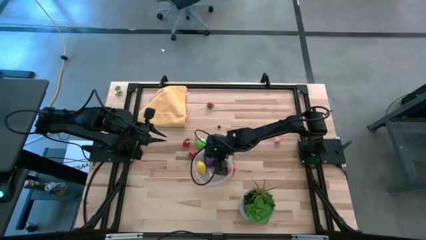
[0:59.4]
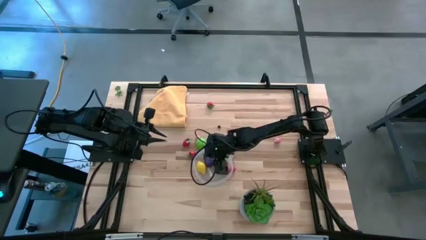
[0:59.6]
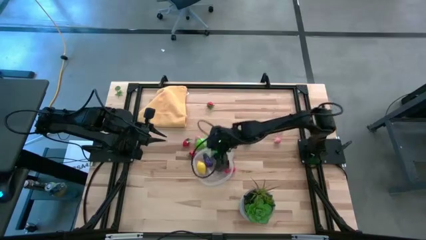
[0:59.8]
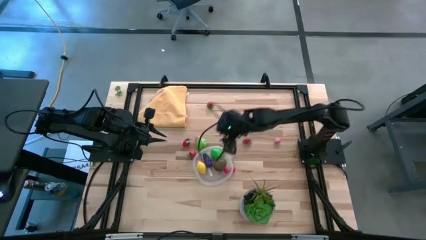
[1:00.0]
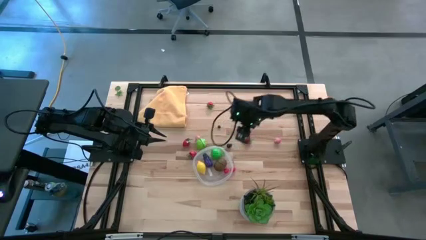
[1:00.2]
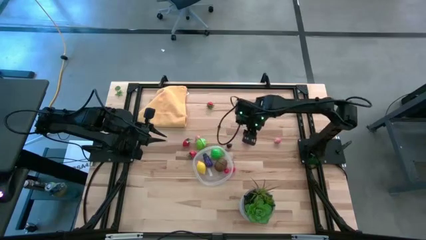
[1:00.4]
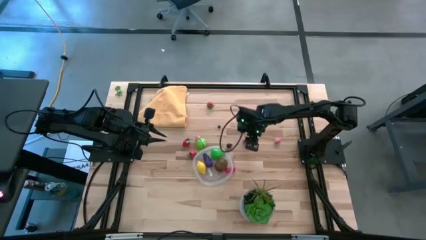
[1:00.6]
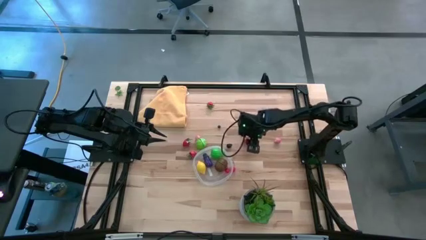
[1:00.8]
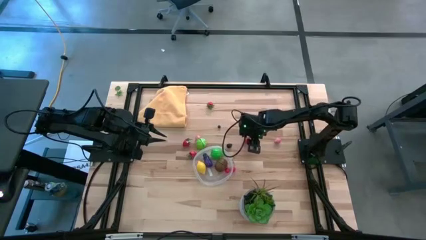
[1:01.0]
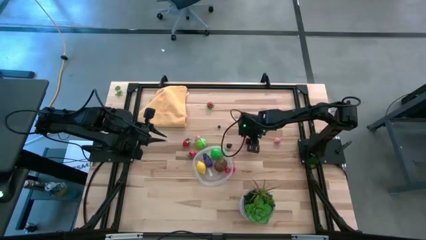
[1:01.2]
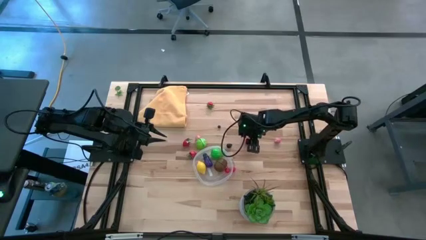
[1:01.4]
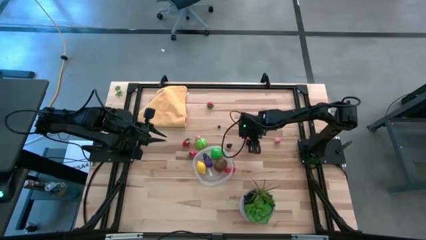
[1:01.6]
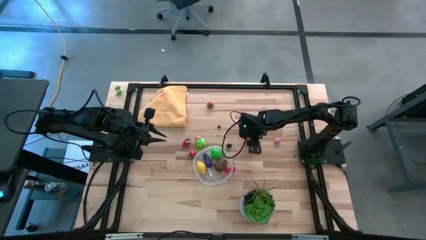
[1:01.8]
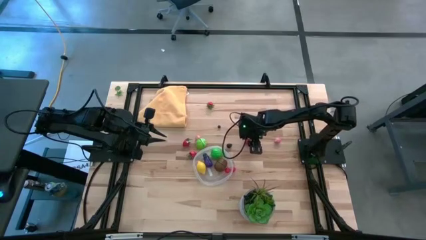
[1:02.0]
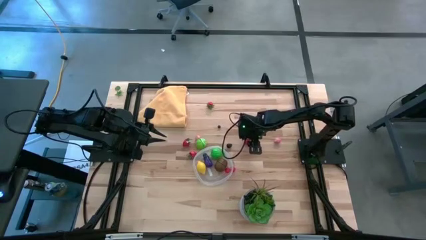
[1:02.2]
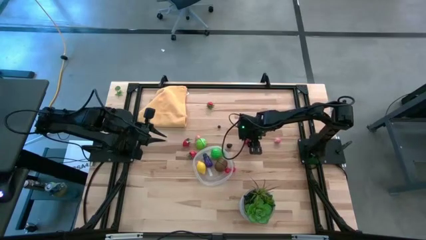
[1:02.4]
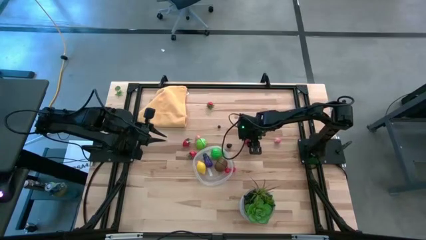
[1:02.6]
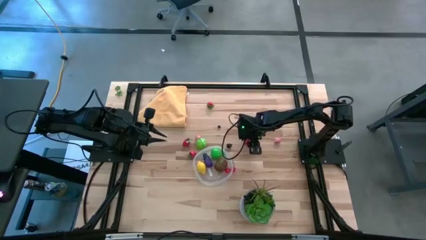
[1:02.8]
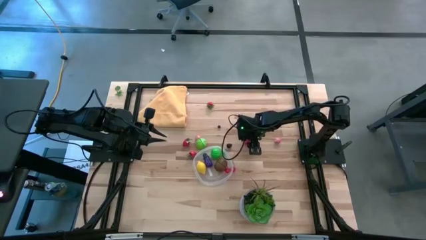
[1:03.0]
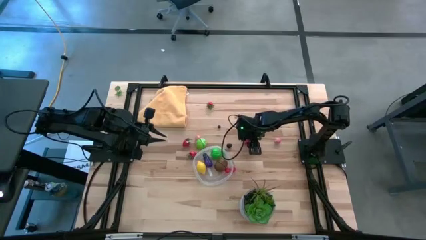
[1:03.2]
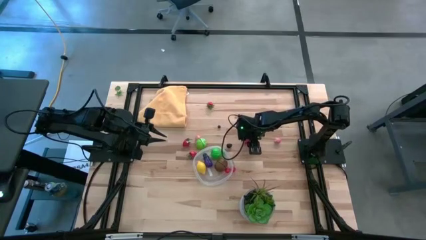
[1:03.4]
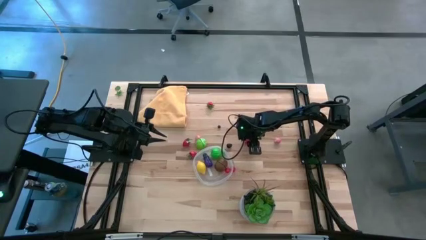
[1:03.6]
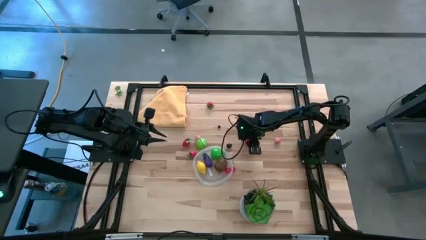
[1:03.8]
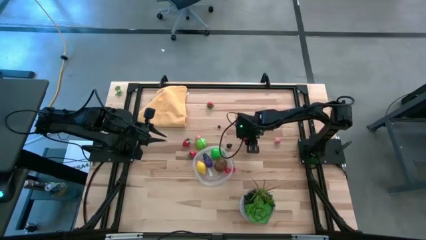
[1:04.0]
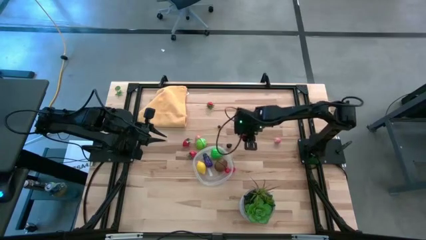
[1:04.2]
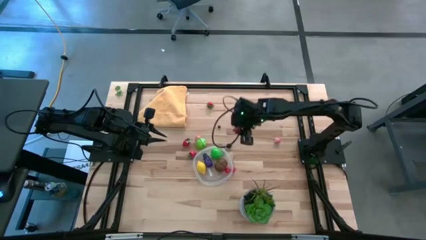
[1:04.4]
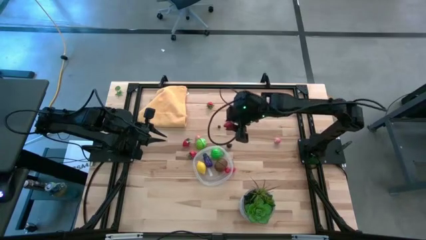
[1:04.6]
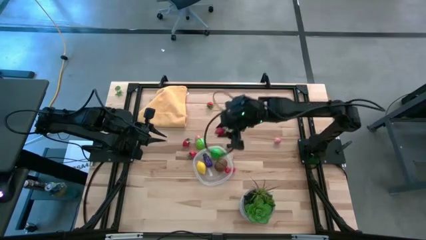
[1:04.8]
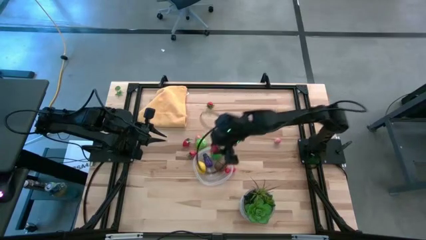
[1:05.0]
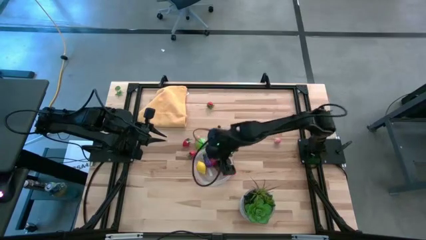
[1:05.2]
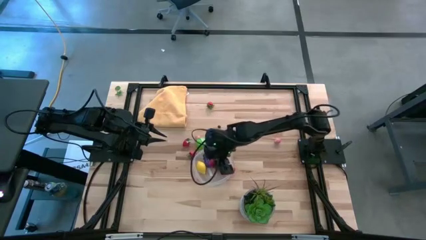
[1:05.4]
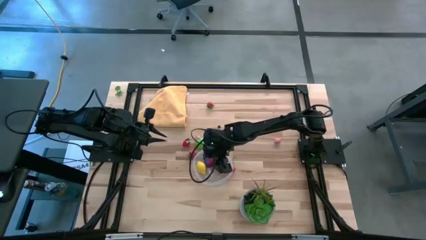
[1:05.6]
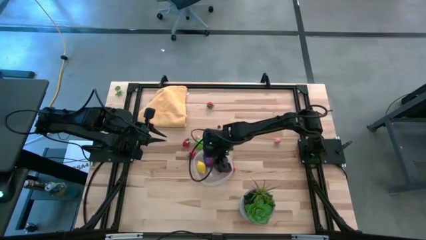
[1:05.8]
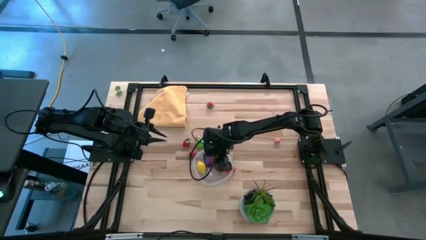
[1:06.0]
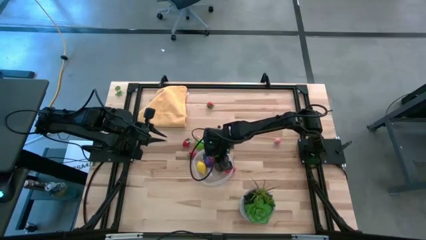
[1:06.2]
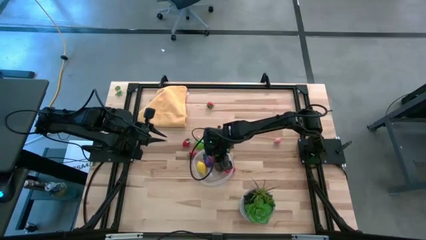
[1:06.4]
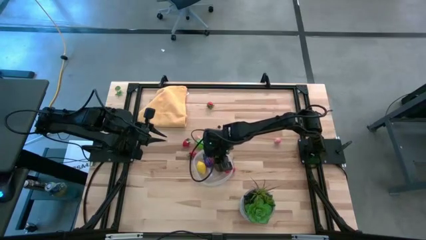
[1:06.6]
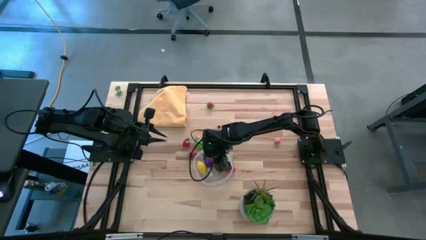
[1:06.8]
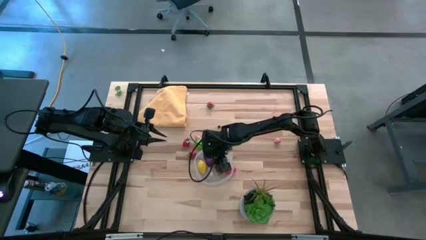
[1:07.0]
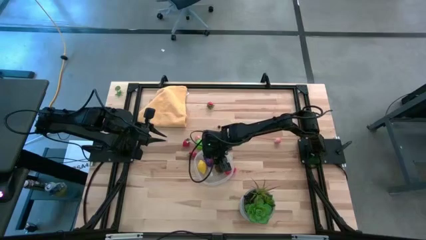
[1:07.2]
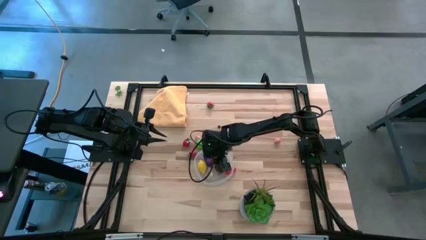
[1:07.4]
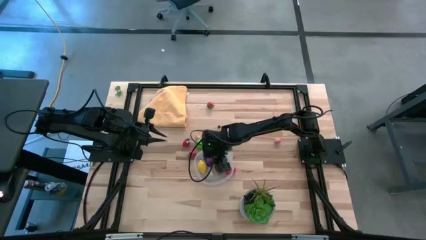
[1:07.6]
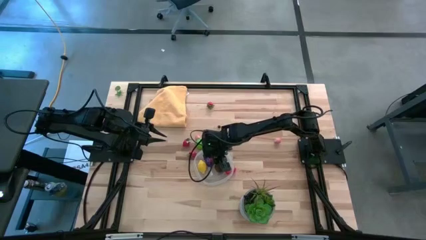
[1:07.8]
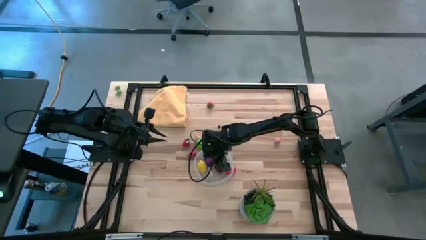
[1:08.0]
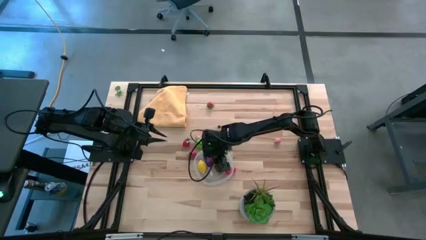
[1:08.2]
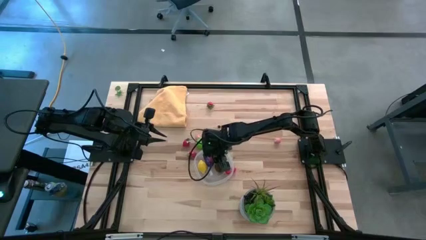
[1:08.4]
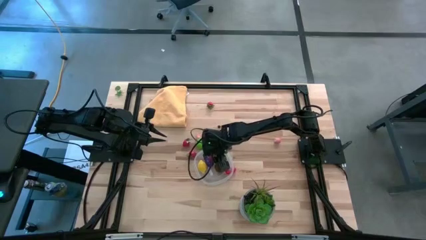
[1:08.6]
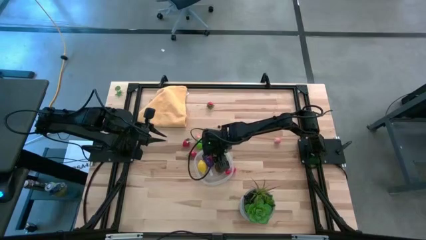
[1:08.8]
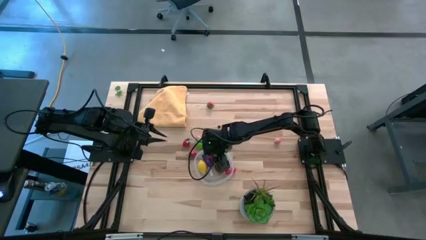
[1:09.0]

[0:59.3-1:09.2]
Task: Pick and placing Produce into tupperware
Put the red strawberry into the transparent bin

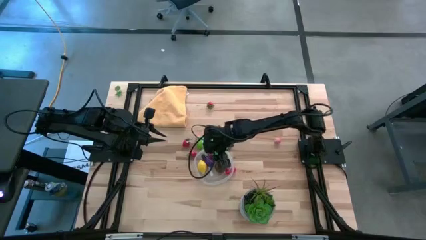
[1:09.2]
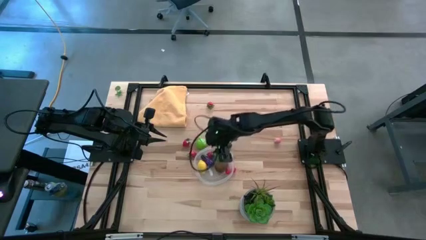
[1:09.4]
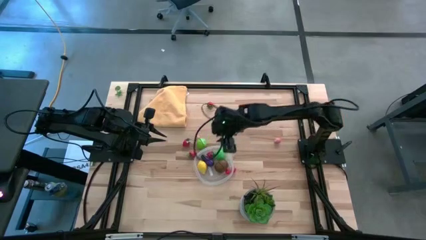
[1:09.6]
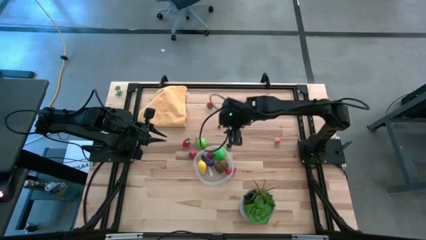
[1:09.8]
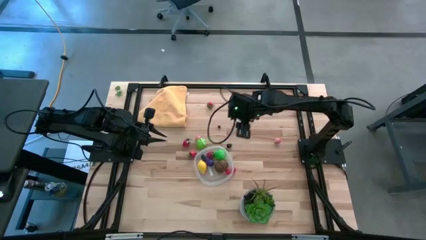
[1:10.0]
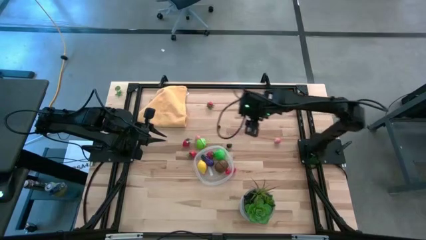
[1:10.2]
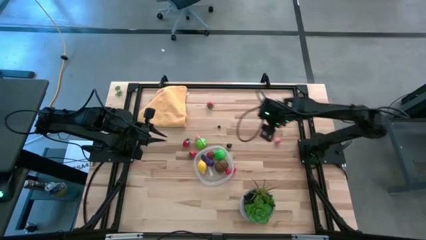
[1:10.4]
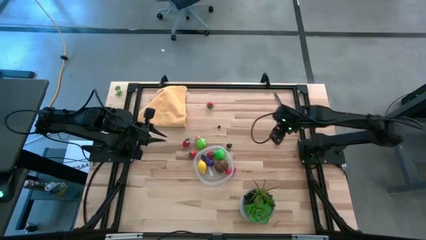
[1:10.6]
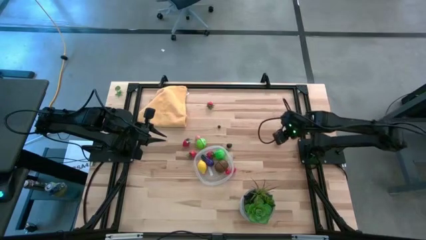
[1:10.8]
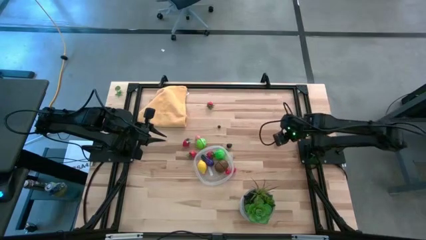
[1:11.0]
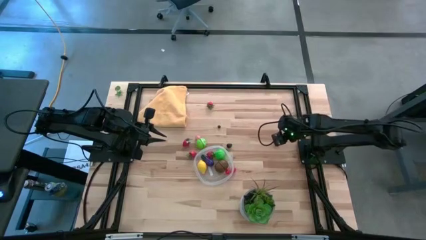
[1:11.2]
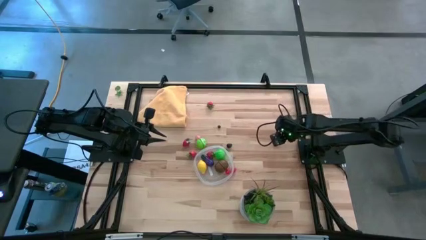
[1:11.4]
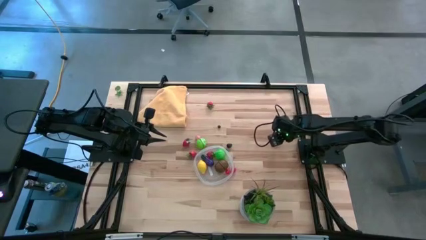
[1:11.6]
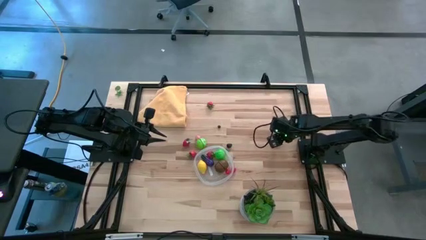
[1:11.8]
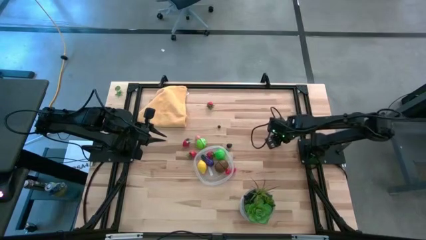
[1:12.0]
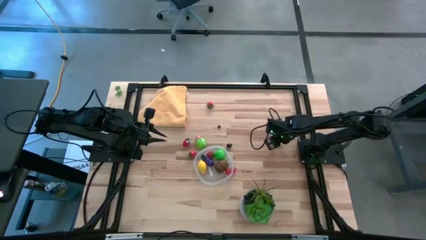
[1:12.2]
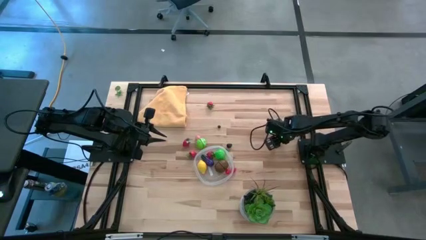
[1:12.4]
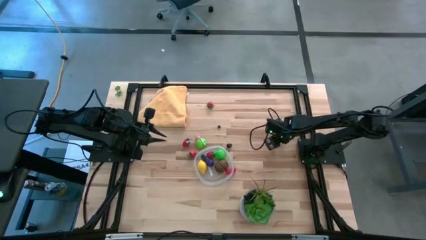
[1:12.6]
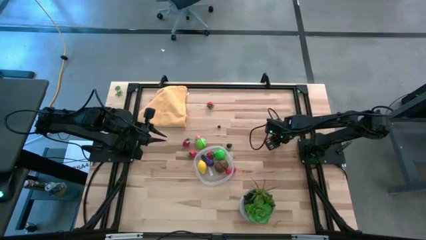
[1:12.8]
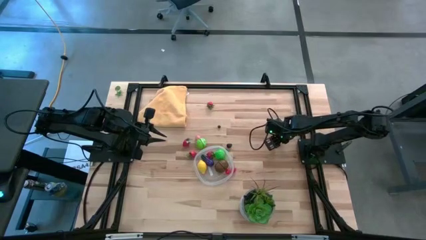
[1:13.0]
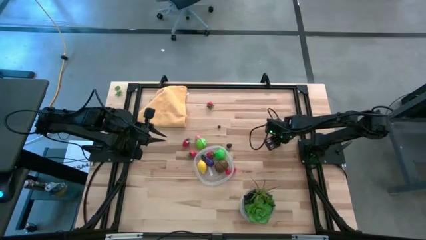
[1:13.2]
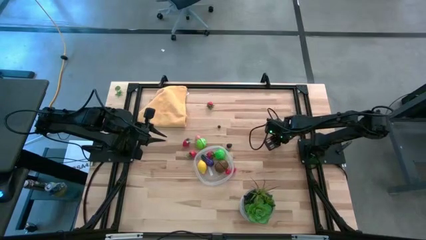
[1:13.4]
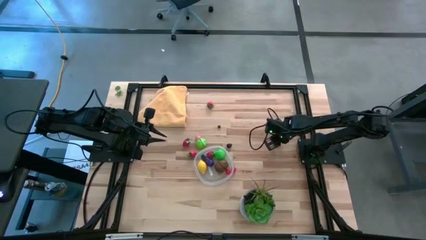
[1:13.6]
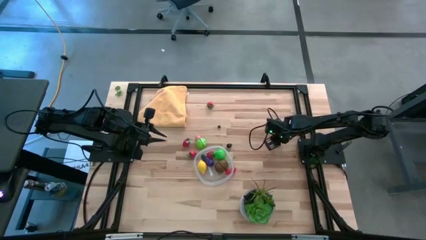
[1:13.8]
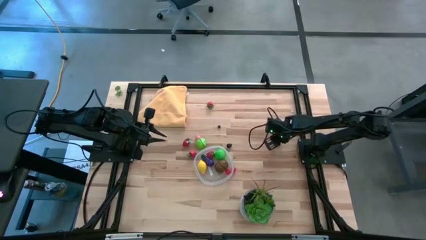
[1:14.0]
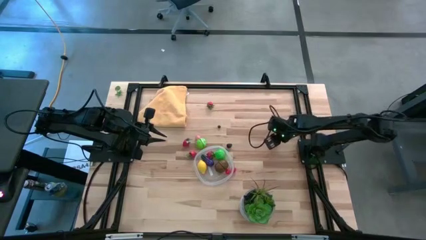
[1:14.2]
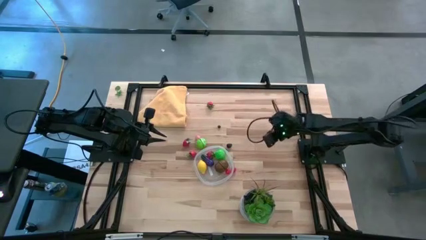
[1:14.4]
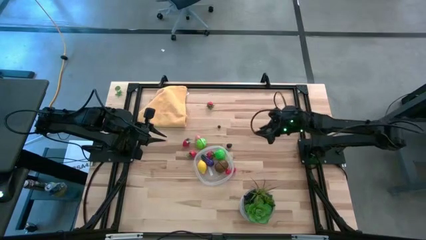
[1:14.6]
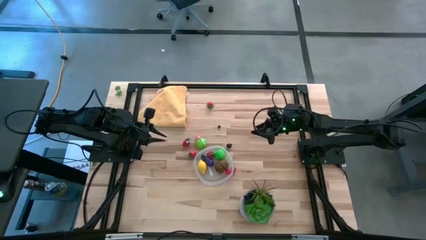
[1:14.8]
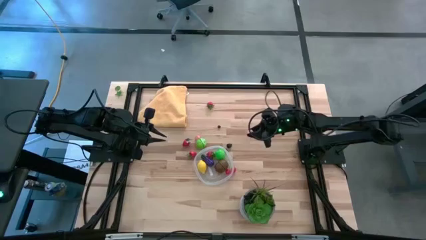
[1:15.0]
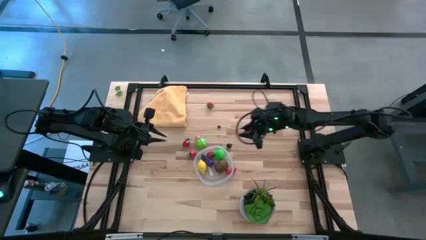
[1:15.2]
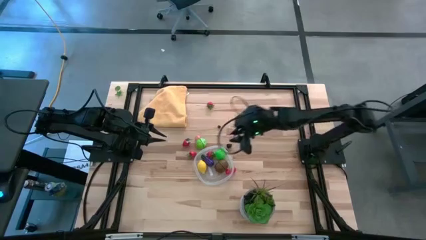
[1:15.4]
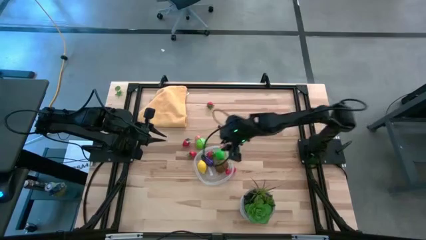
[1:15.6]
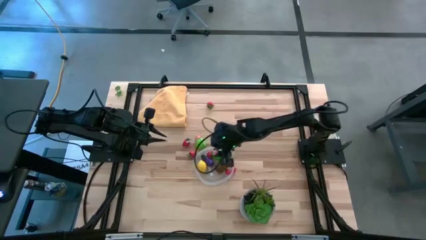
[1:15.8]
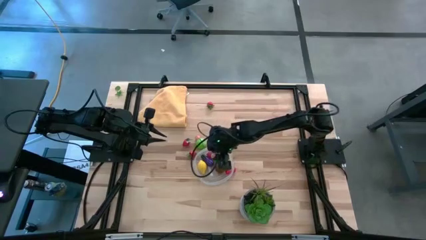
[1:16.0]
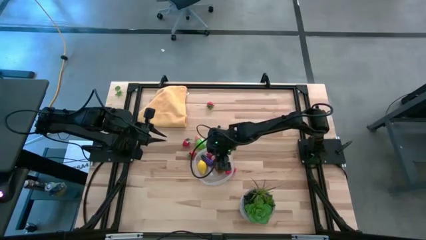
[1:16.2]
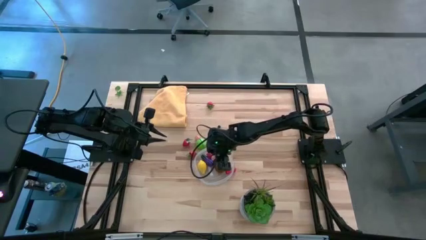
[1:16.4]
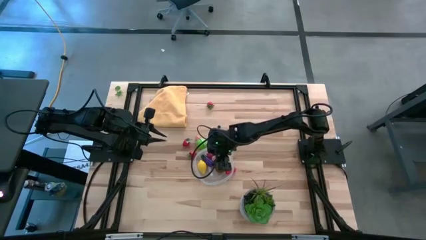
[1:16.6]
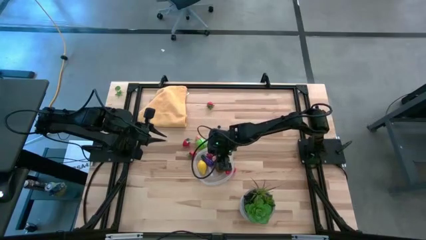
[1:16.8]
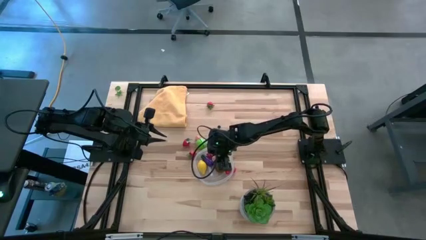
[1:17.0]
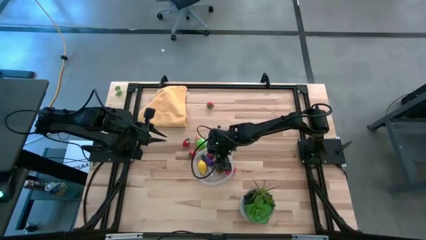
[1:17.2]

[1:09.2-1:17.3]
Put the pink peach into the transparent bin
